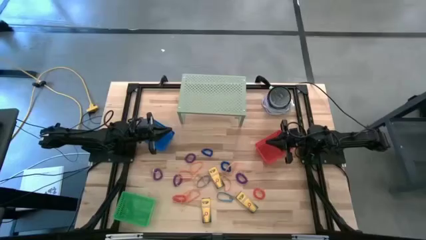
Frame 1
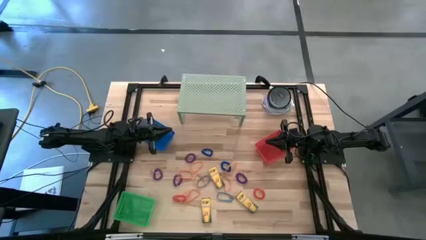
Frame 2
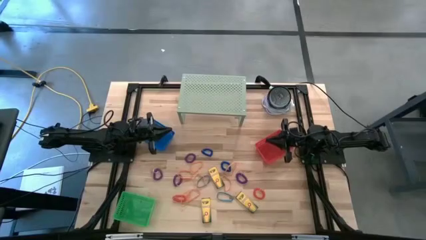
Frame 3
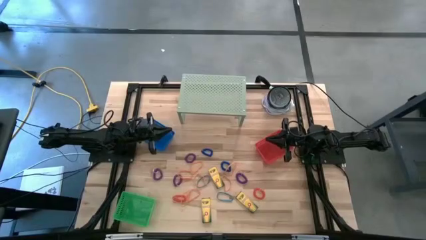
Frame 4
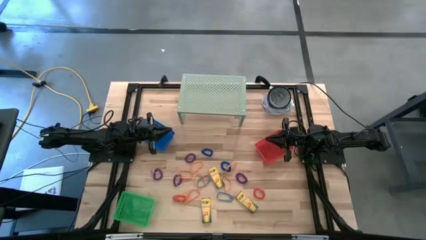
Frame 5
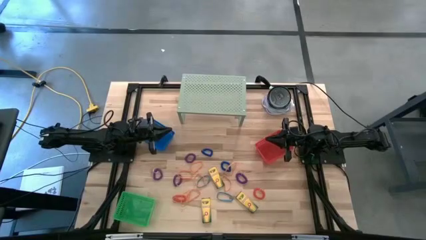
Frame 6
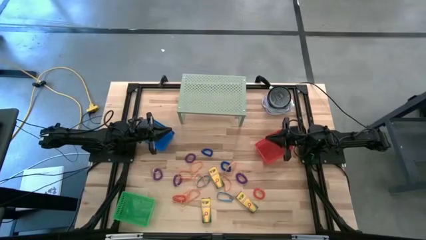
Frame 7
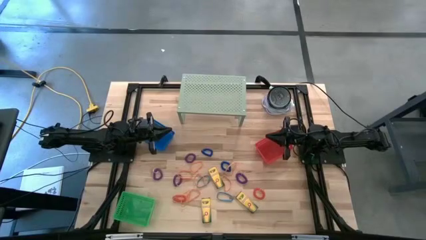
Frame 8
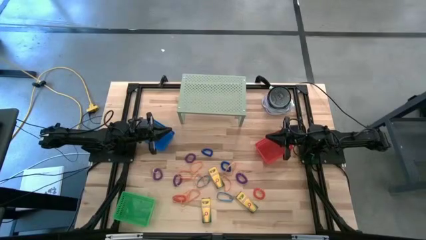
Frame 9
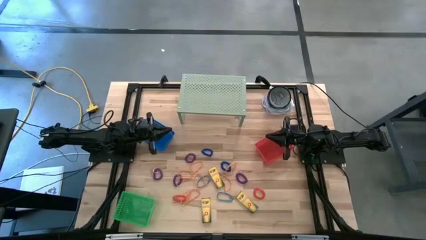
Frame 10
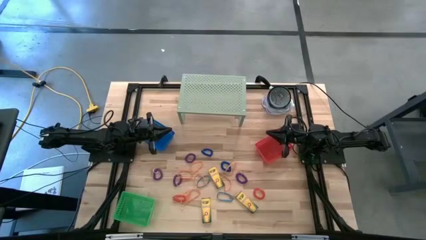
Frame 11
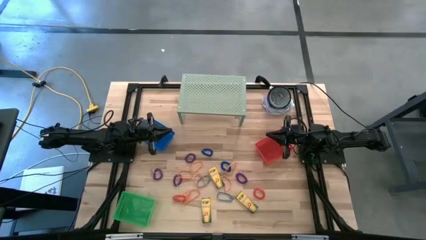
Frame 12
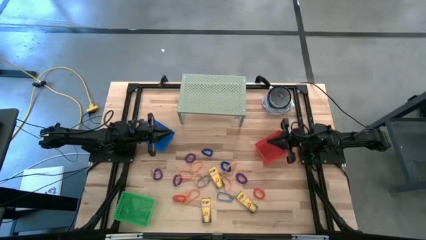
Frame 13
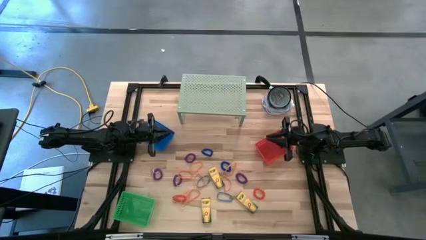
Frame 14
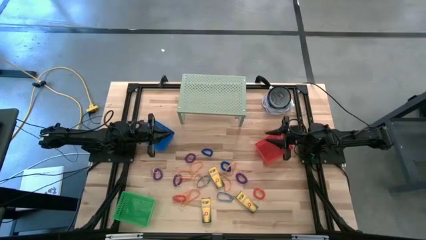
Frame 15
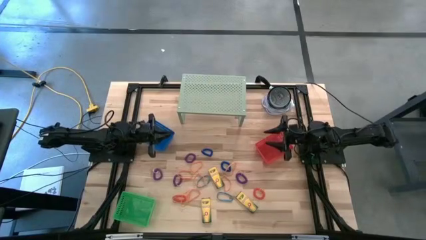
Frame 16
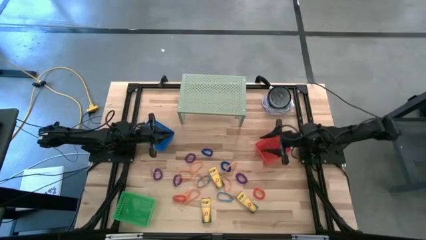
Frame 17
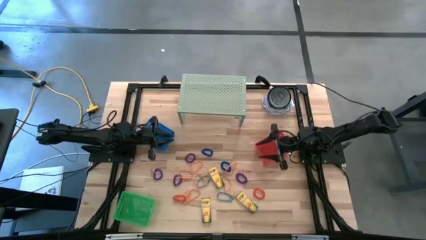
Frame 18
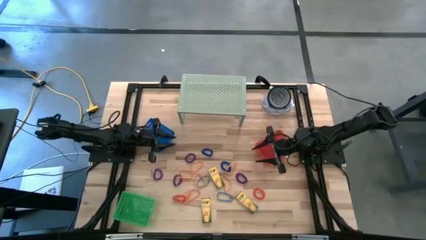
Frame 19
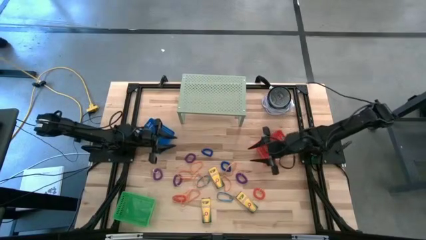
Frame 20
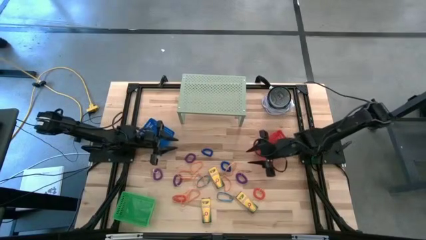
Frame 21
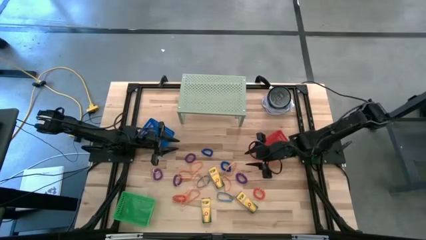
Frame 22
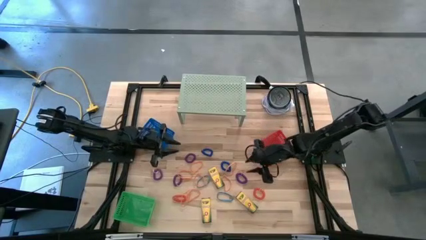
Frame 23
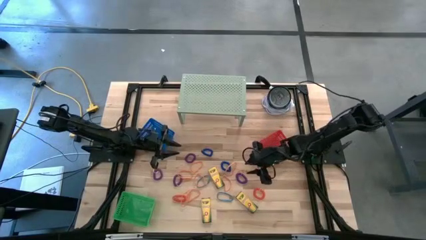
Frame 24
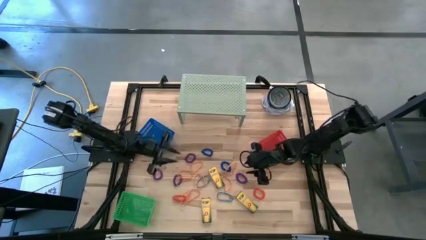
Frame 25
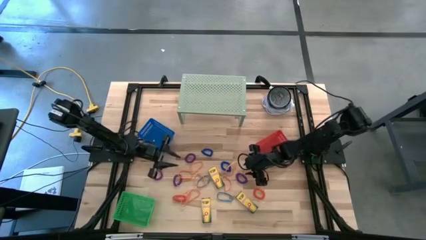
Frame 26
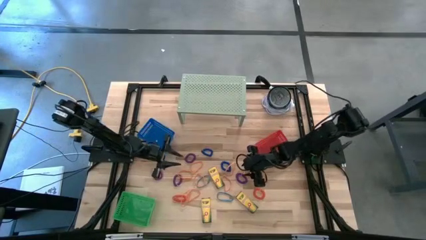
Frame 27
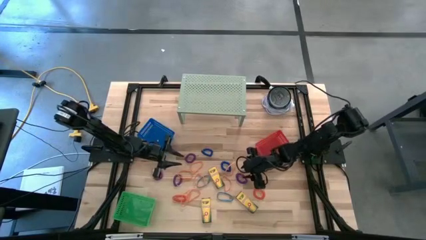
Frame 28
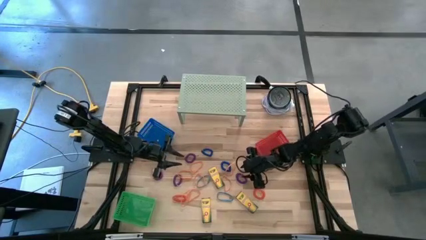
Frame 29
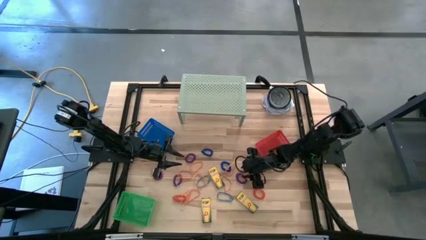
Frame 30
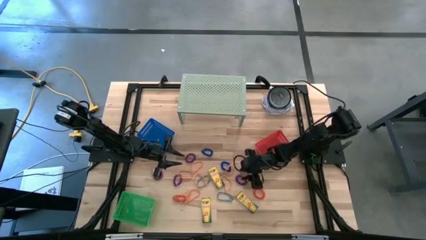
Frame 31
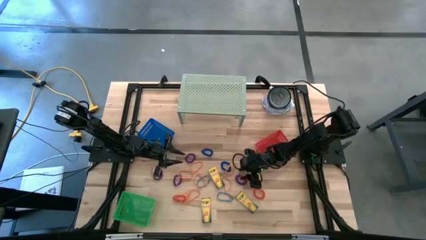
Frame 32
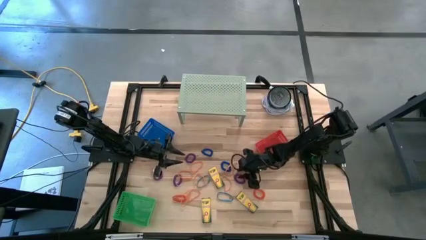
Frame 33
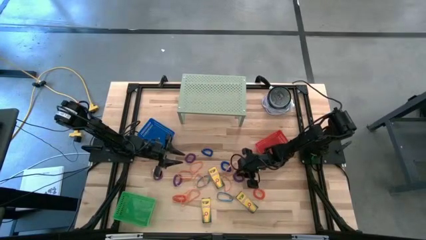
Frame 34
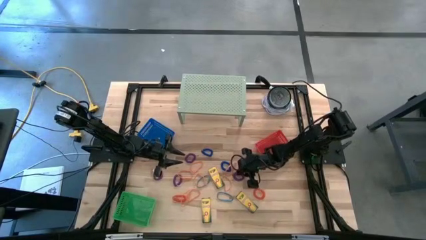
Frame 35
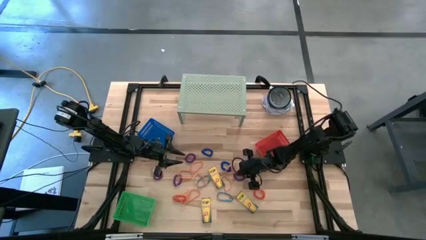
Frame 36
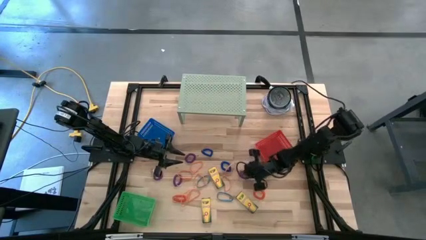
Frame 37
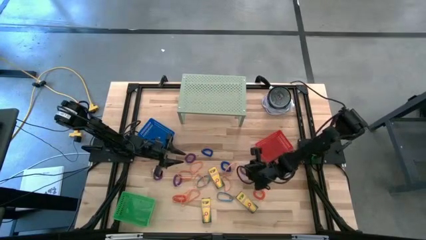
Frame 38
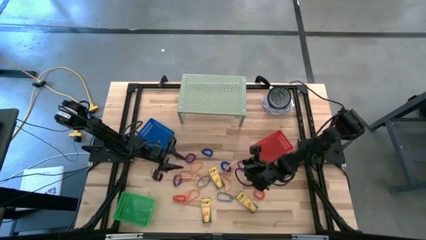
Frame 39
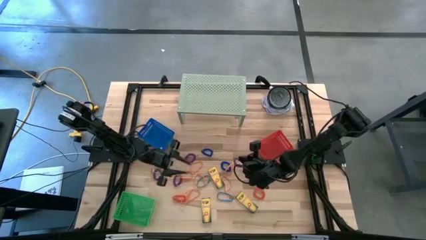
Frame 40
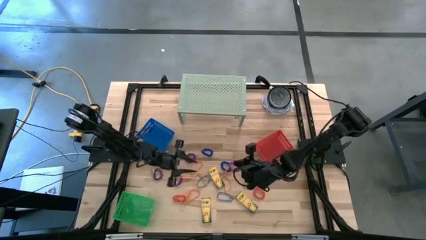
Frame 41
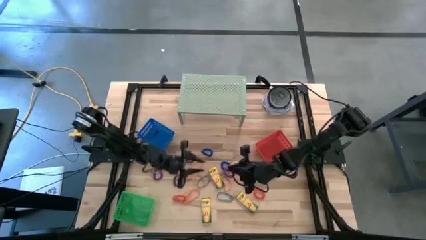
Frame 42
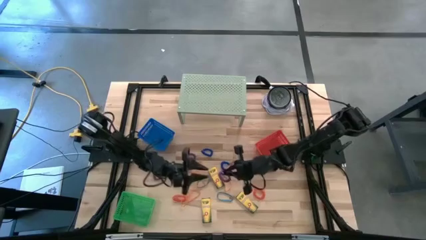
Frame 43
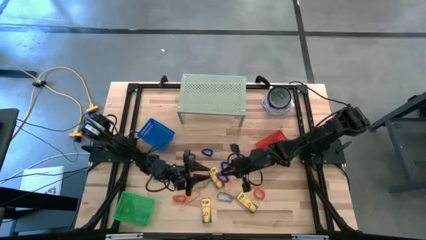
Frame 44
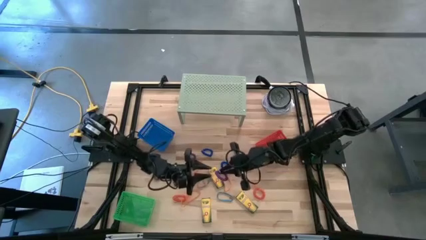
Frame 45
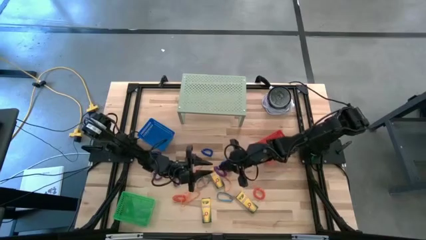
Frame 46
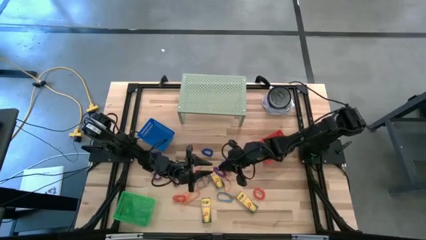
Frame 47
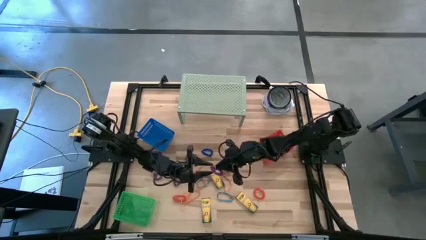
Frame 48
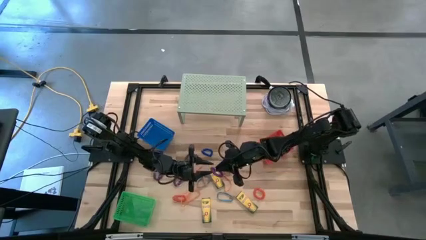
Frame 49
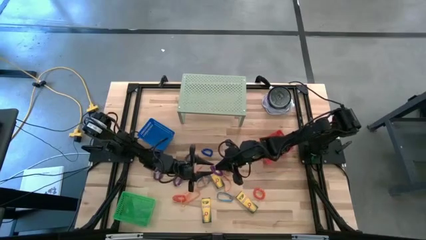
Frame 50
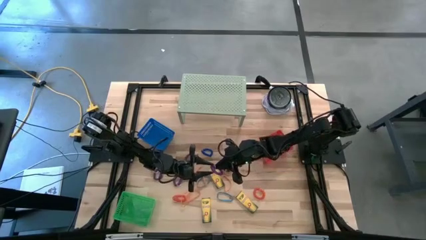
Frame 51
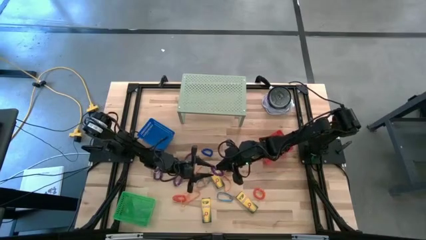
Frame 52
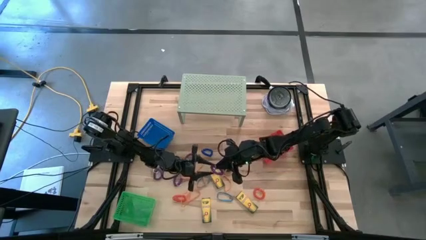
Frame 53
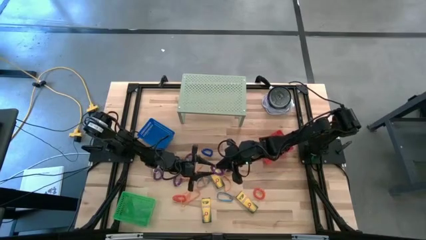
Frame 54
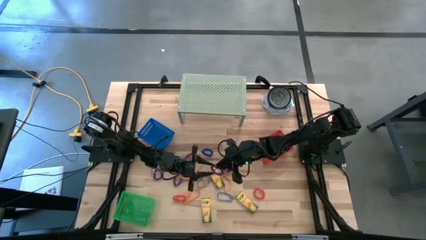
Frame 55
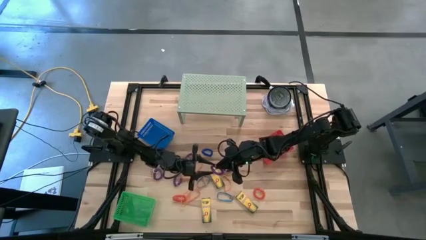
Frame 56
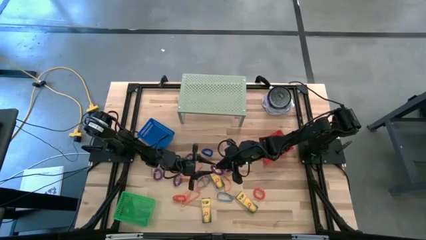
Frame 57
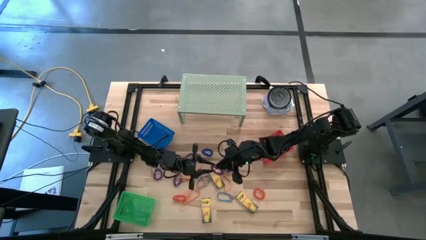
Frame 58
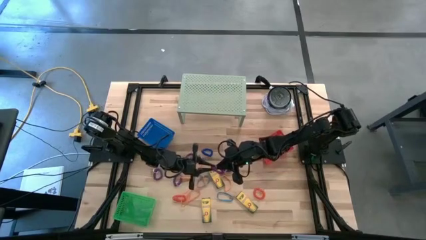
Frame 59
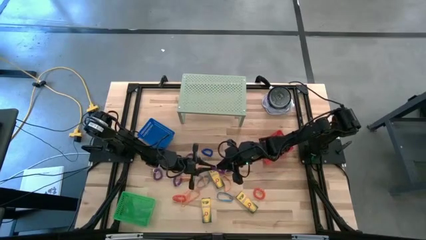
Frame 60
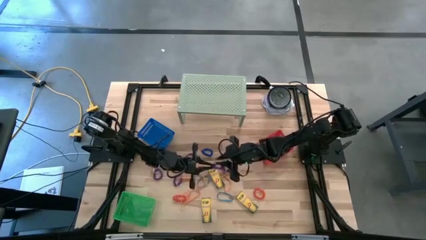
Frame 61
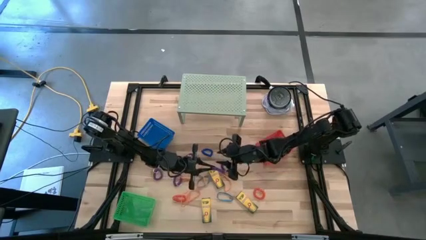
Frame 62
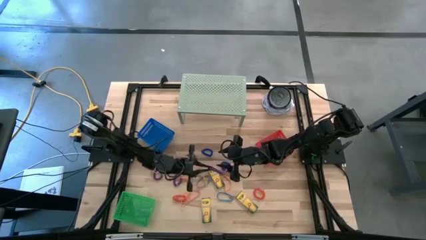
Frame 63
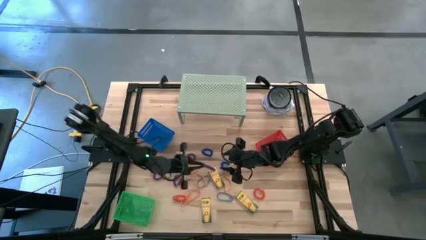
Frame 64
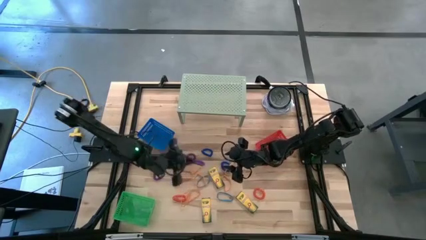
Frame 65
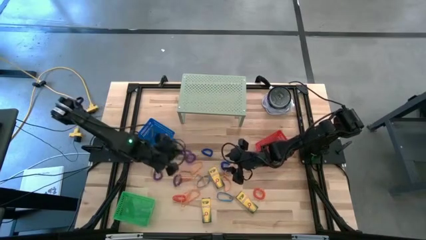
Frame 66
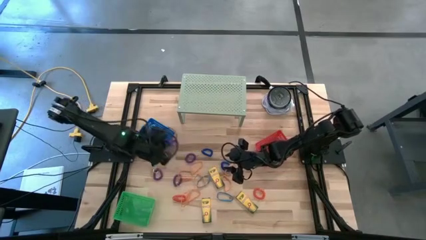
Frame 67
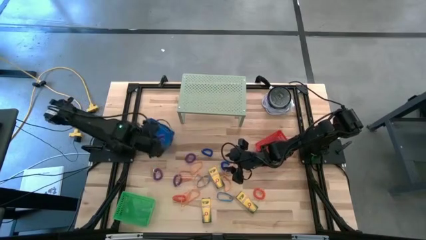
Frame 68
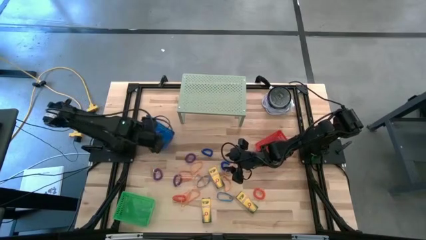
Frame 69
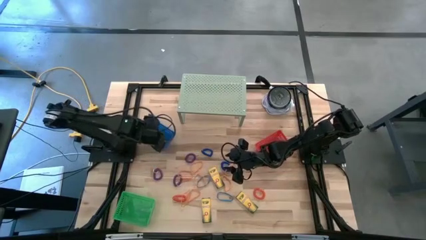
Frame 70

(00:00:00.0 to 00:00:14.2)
Task: Pick & Place Office Desk Supplies
Put the purple spring keychain into the blue bin
